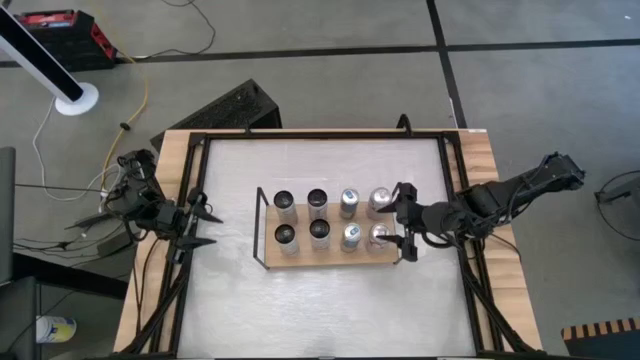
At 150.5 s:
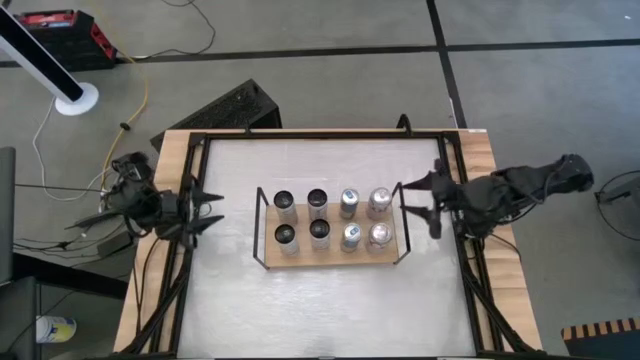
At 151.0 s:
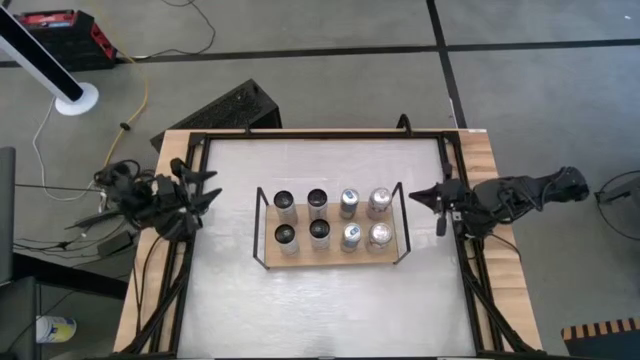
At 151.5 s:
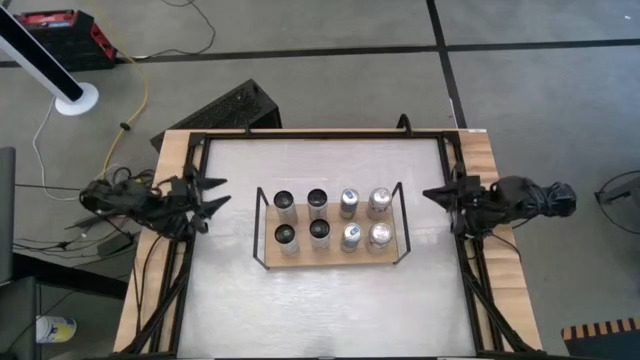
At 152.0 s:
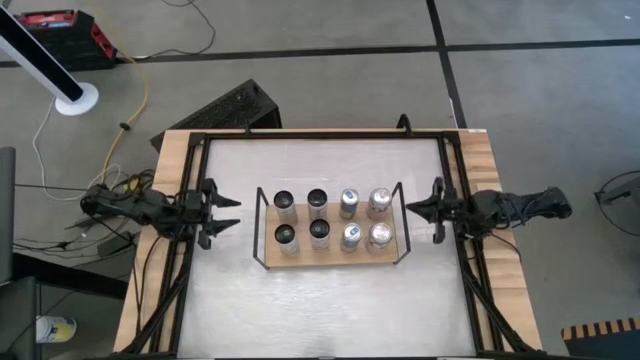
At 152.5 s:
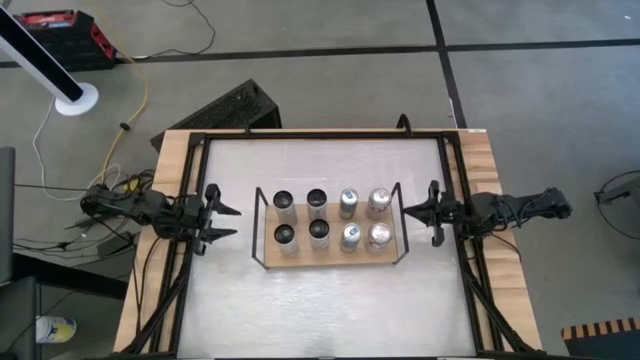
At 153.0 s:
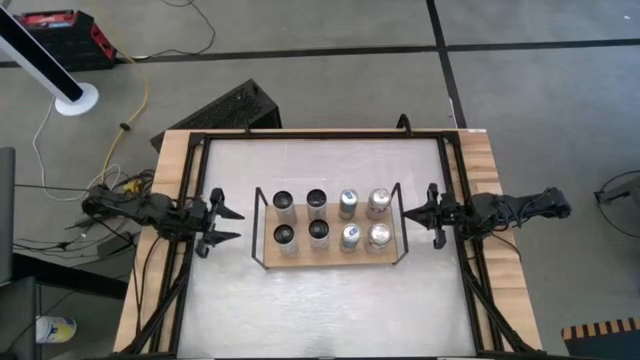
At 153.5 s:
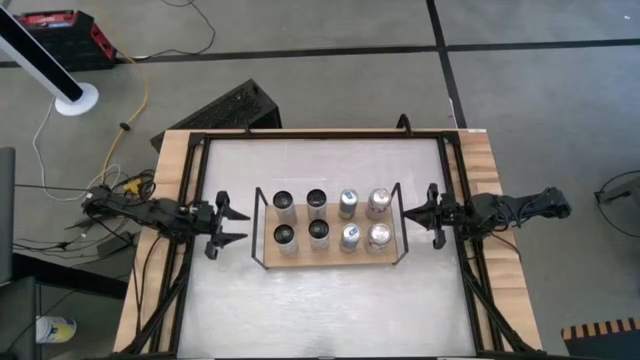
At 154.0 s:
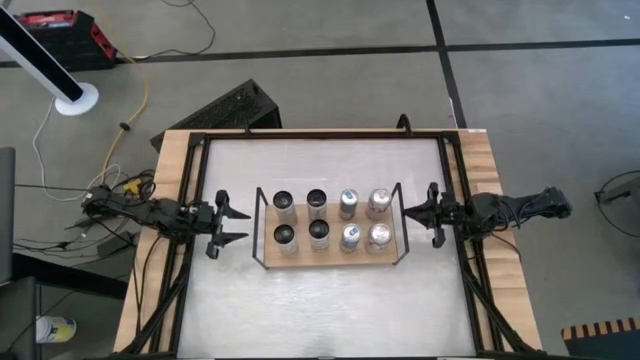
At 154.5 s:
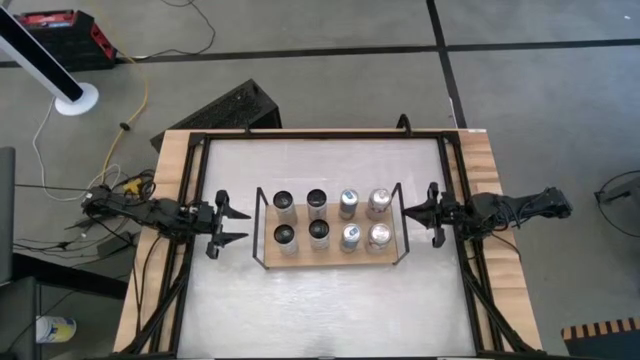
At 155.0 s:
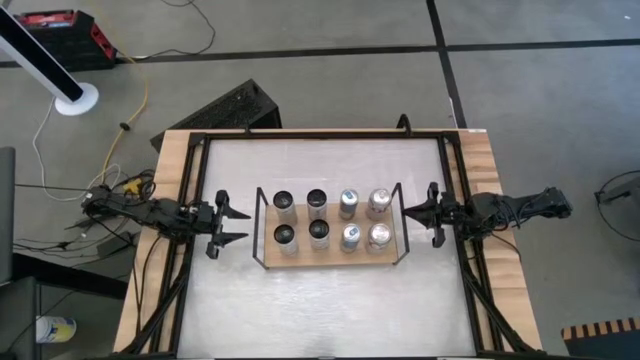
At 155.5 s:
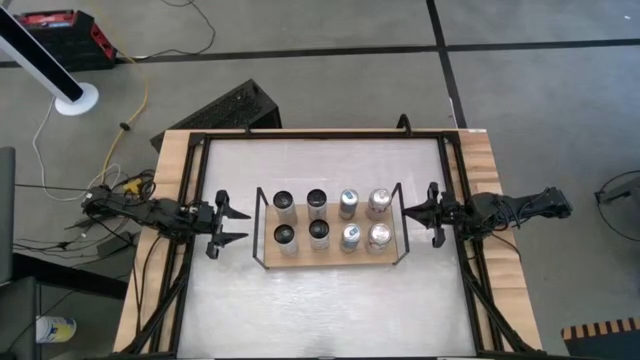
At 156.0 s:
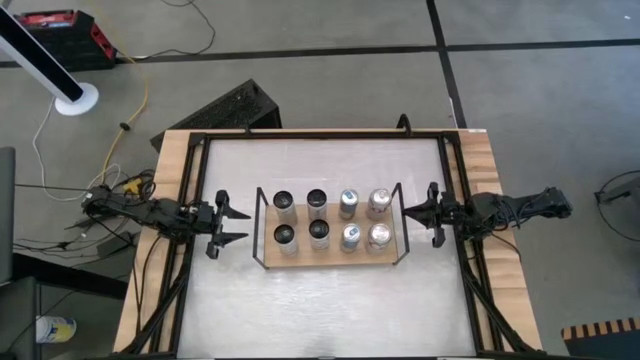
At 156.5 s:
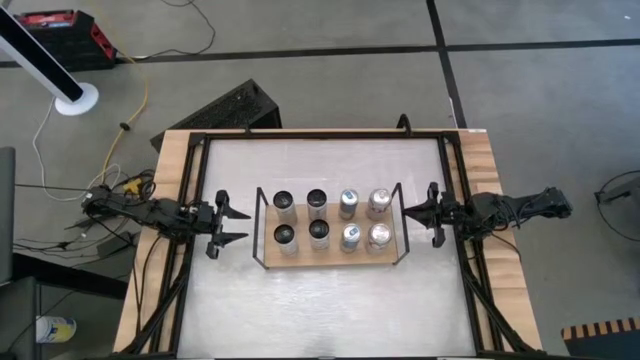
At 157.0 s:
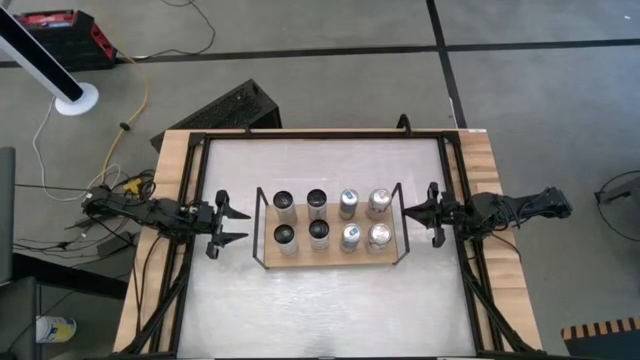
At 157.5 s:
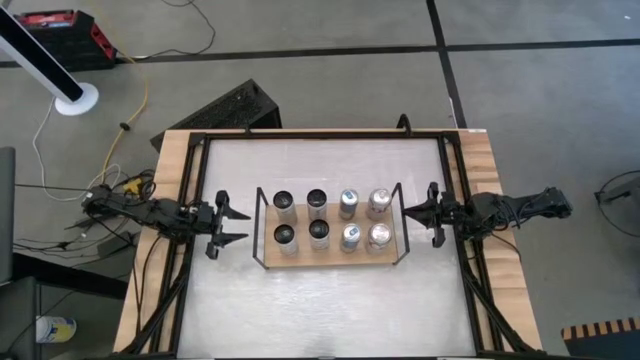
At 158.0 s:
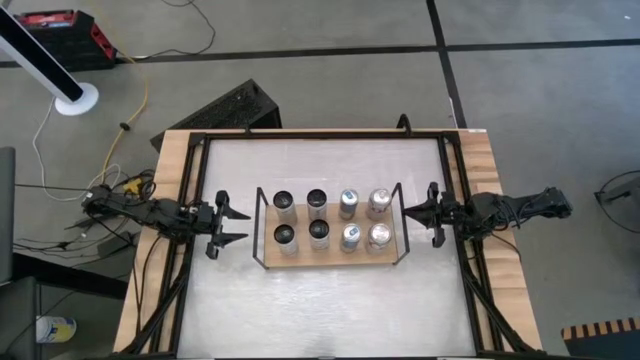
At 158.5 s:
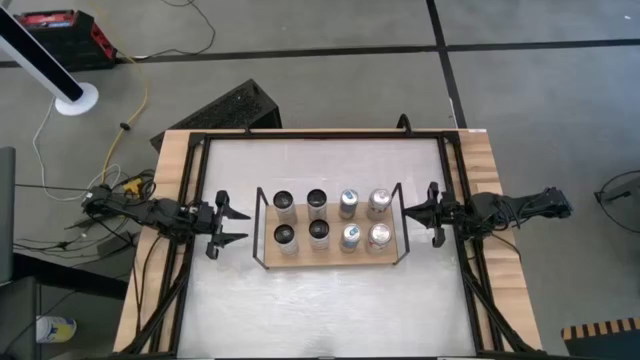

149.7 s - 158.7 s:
Task: Place canned beverage on shelf
Return to Home Position

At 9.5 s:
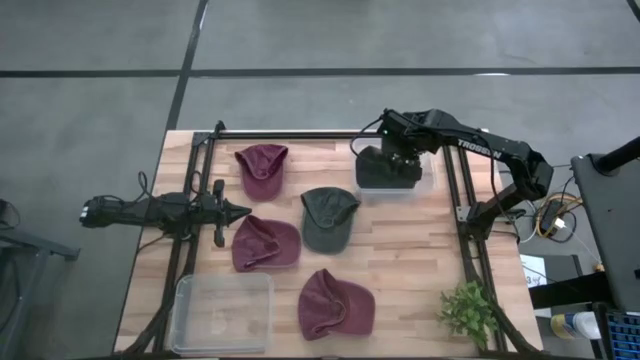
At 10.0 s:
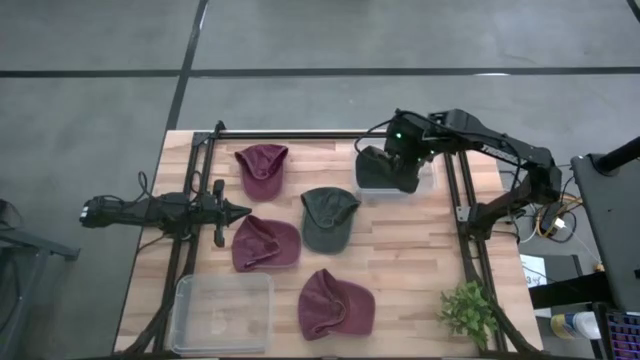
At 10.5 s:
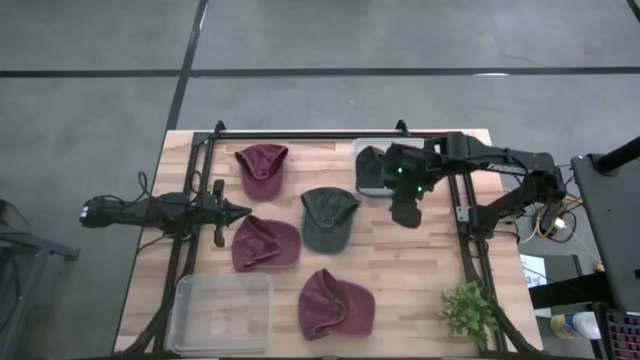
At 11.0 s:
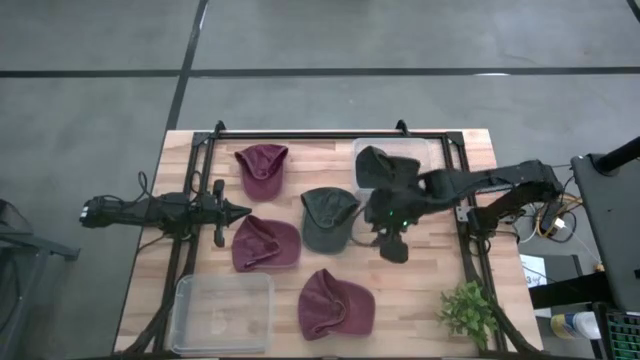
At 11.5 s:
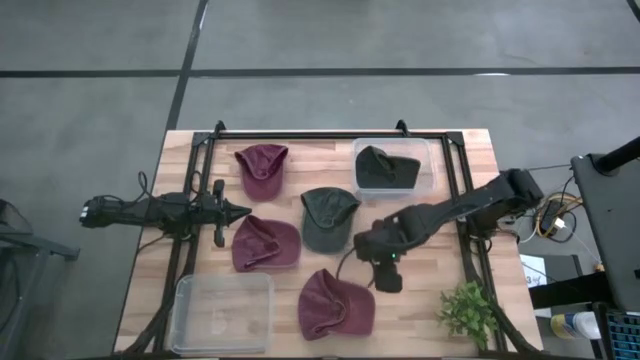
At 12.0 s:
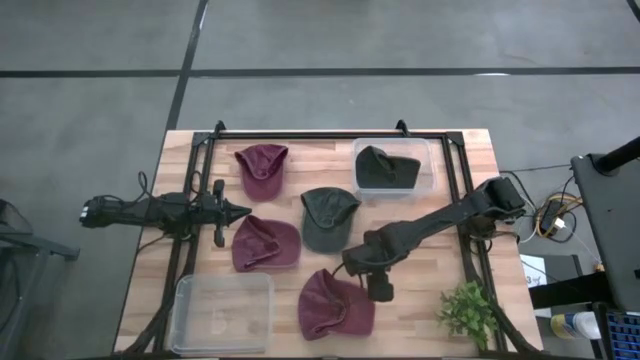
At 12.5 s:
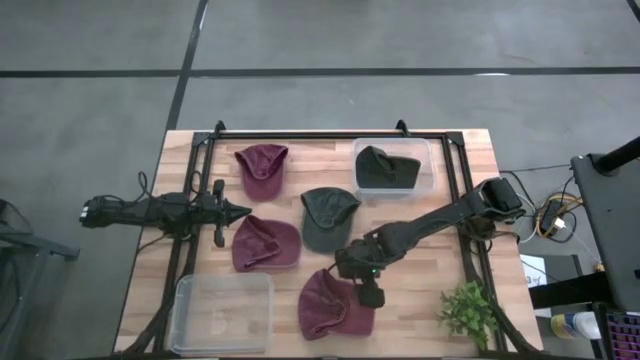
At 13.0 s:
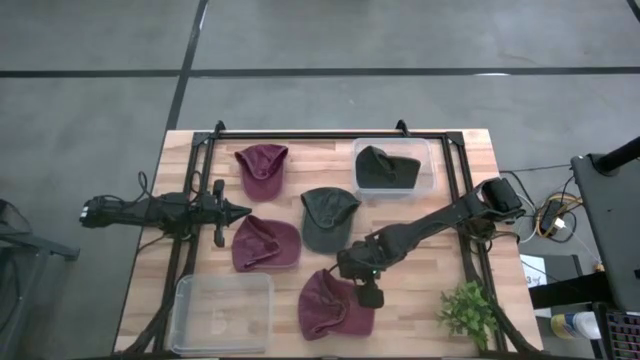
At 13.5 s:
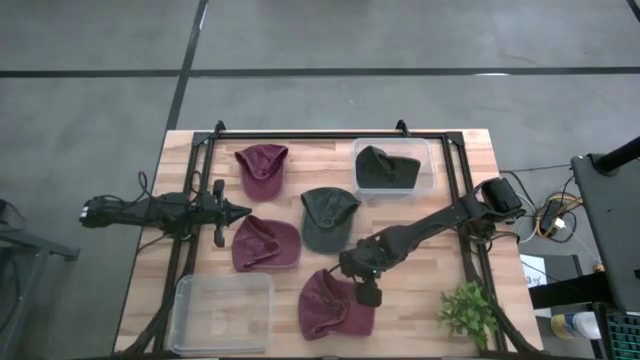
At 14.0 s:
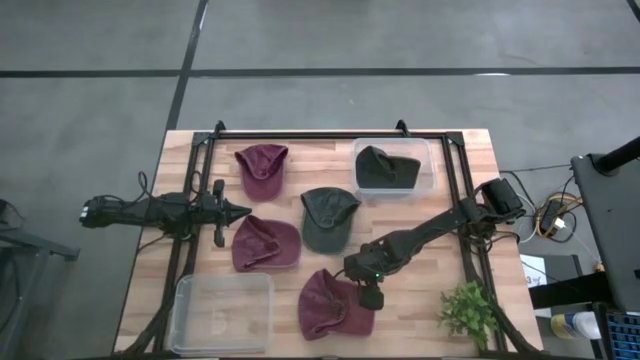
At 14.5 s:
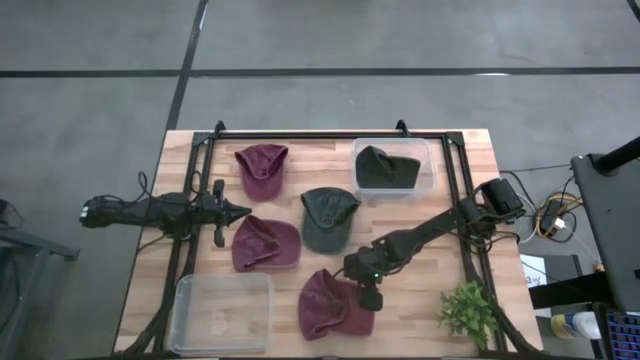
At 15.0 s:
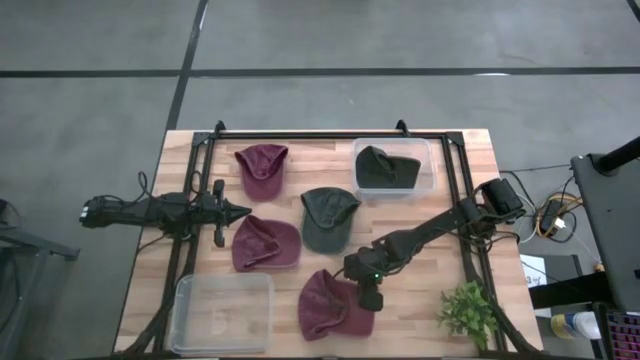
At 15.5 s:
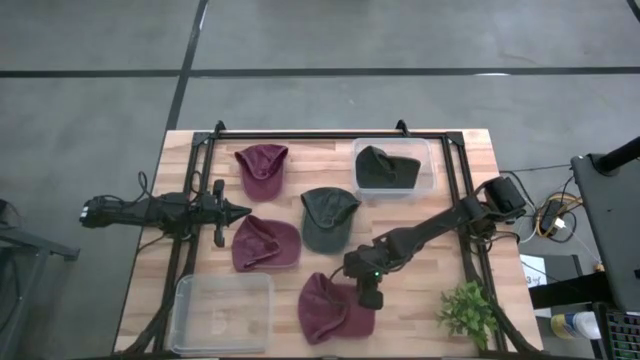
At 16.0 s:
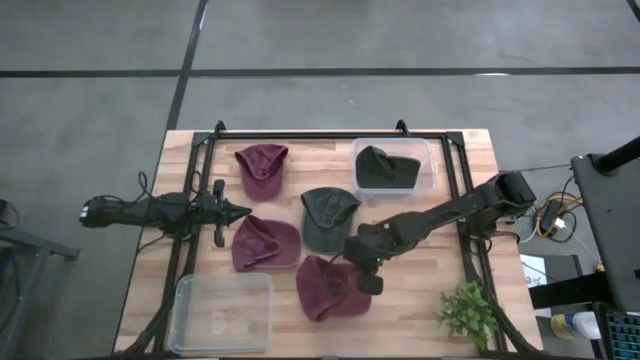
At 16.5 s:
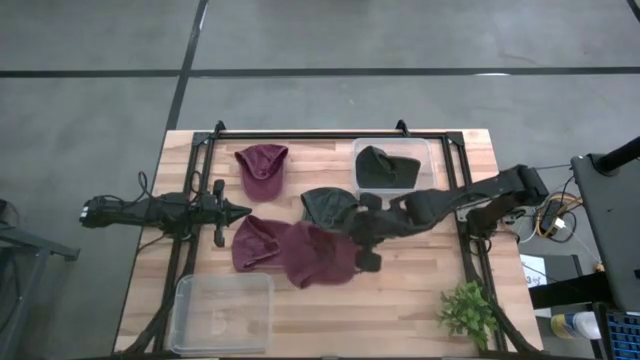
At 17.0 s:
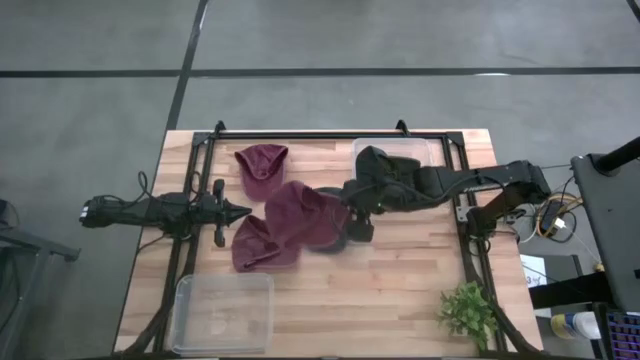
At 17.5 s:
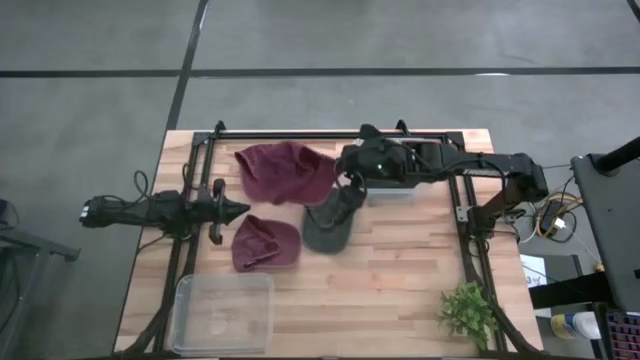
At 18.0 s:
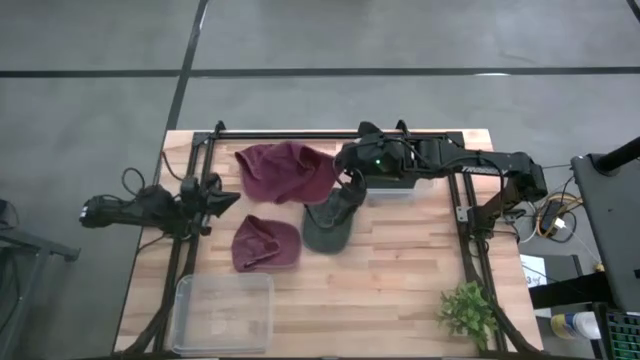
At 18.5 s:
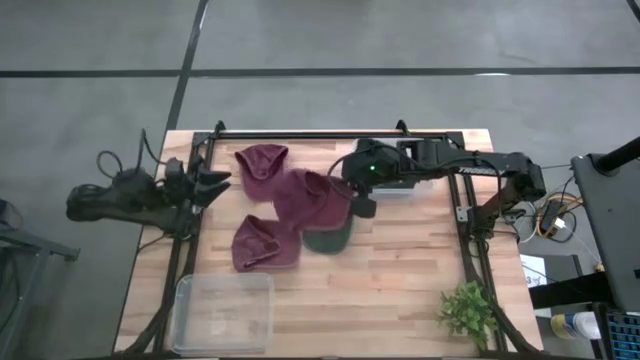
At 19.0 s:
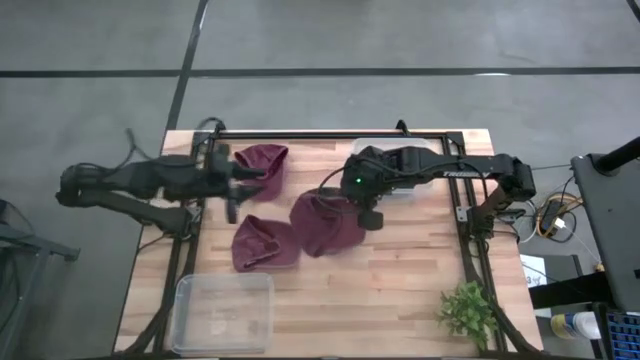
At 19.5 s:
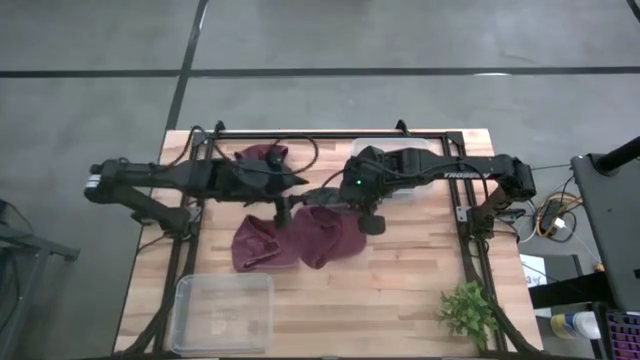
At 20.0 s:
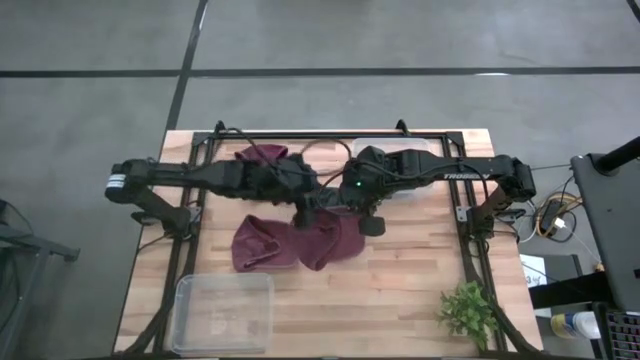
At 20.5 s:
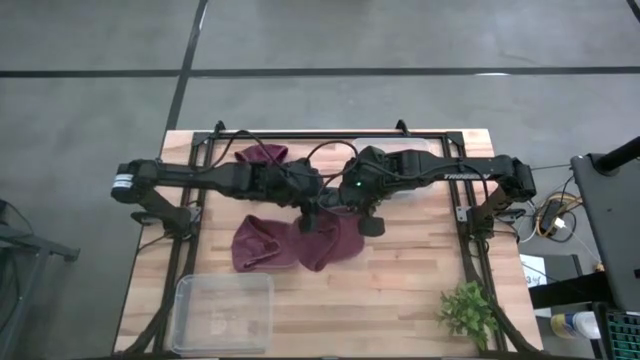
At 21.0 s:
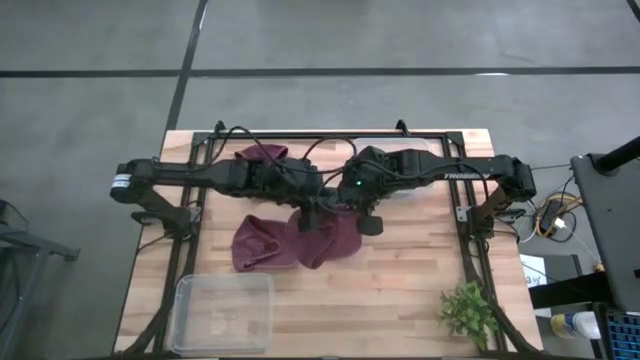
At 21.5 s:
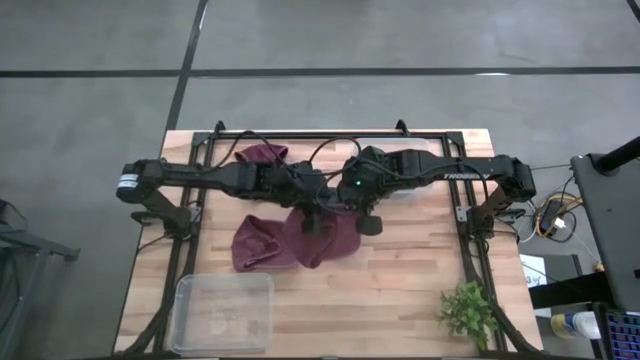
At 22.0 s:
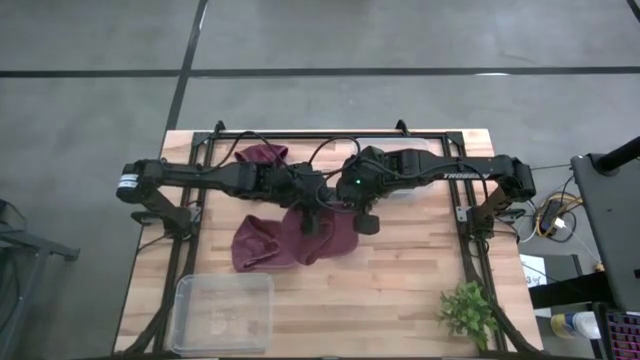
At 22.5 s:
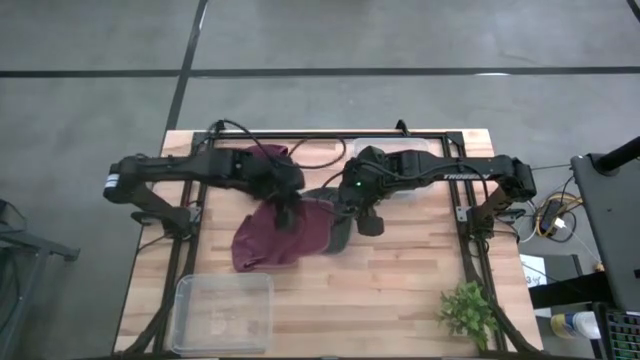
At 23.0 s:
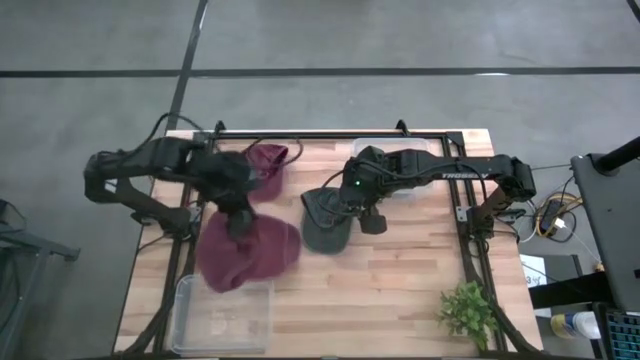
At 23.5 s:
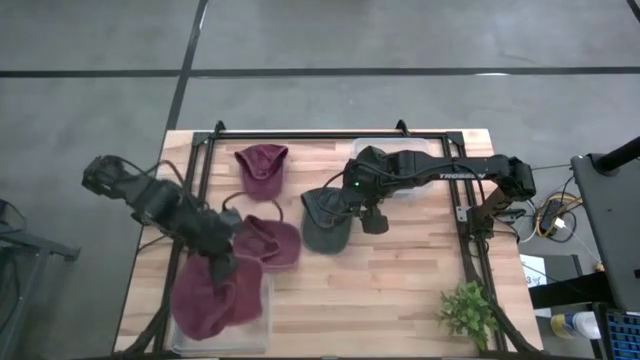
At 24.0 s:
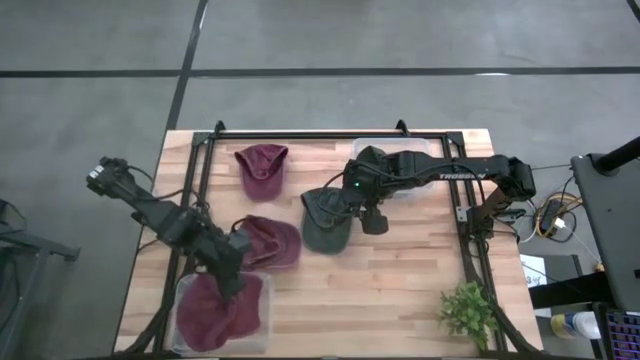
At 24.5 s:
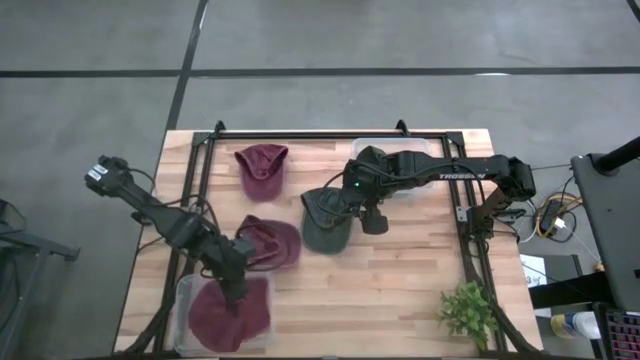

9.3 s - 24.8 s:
Task: Pick & Place hat
Put the bottom dark red cap into the bottom transparent bin
